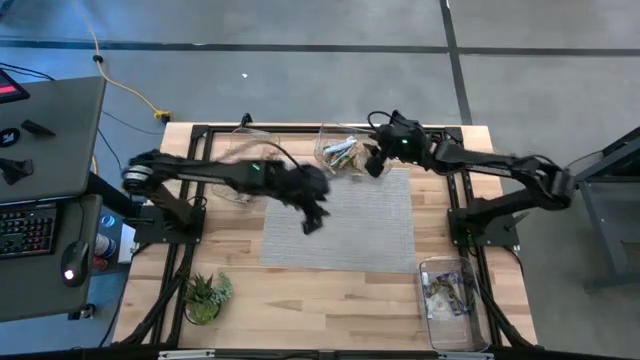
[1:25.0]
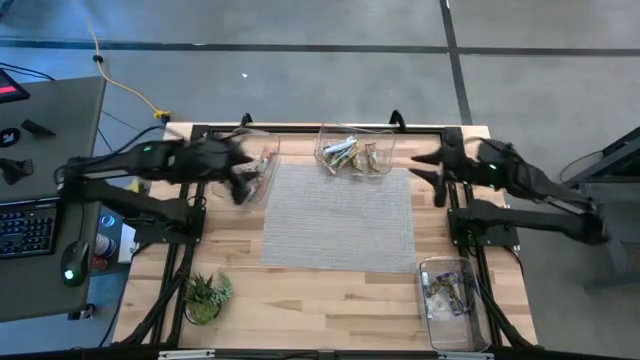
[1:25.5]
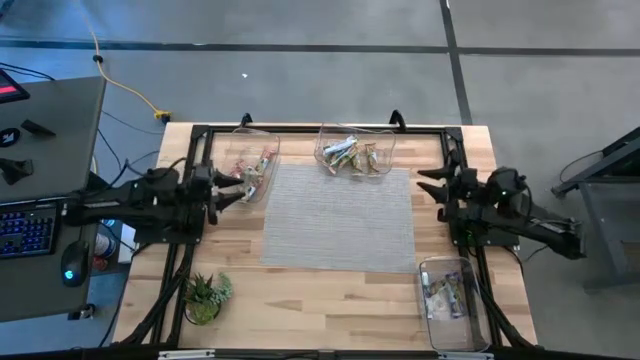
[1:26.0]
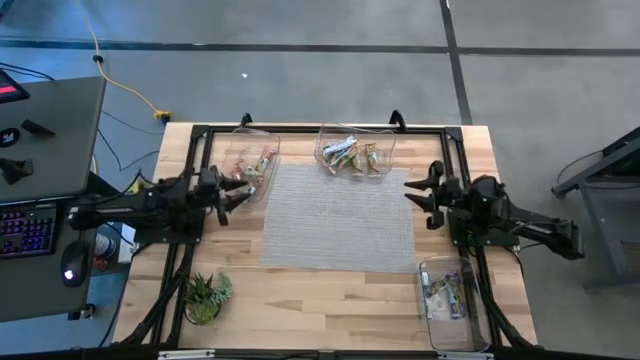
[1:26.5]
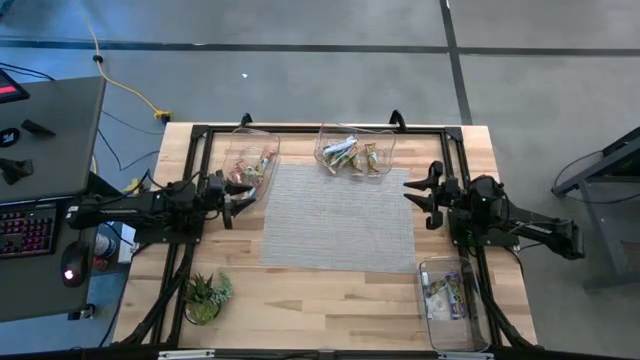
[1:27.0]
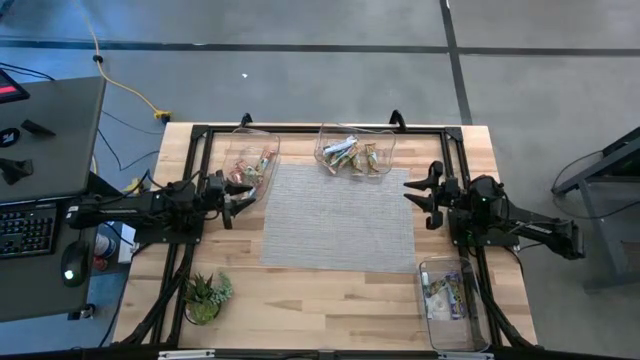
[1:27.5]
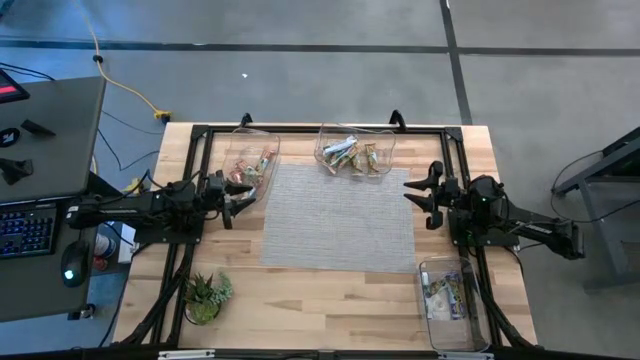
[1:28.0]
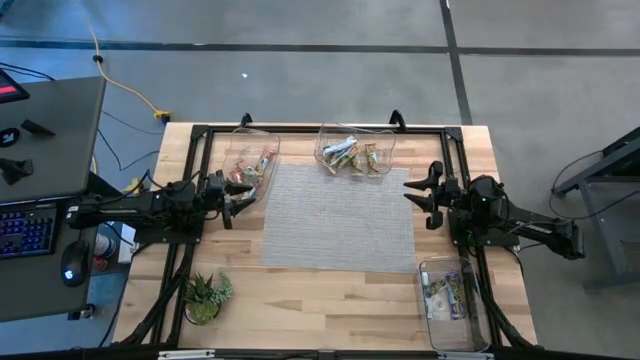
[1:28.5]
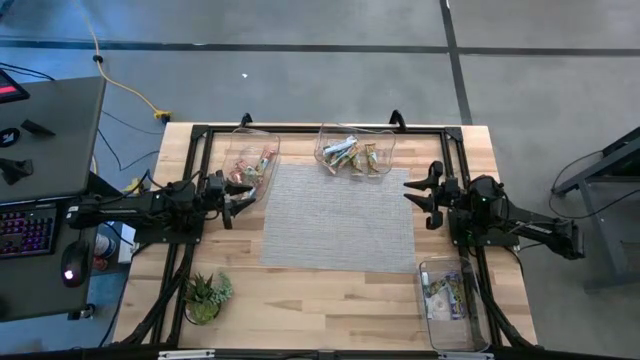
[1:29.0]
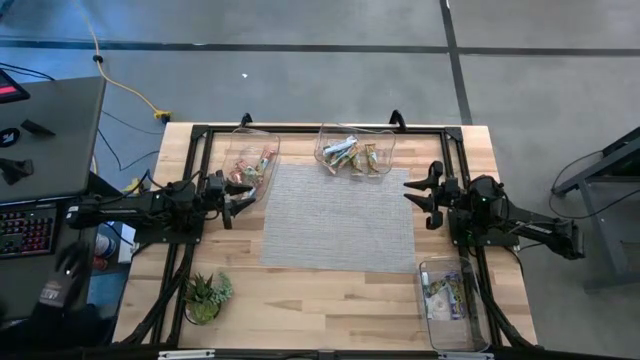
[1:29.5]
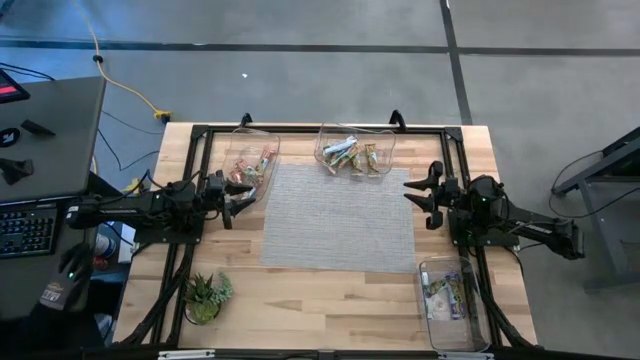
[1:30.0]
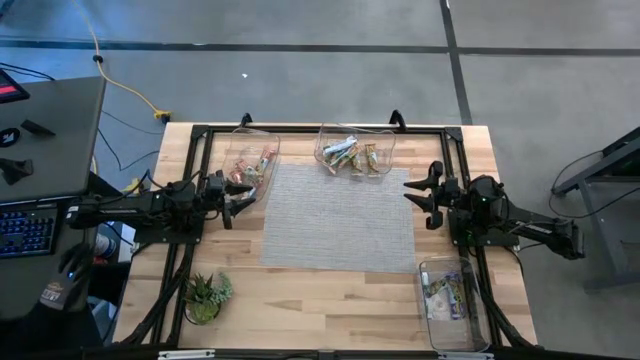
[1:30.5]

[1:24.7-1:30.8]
Task: Pick and place Granola Bars by type
Return to Home Position

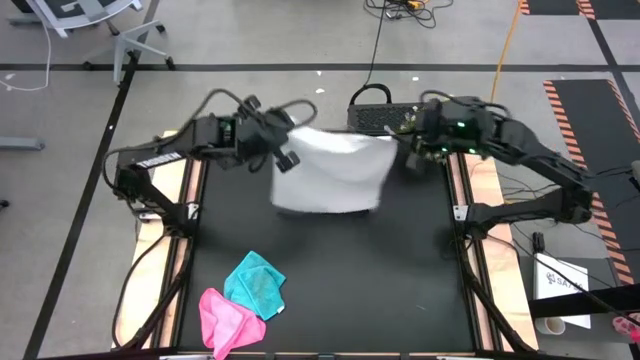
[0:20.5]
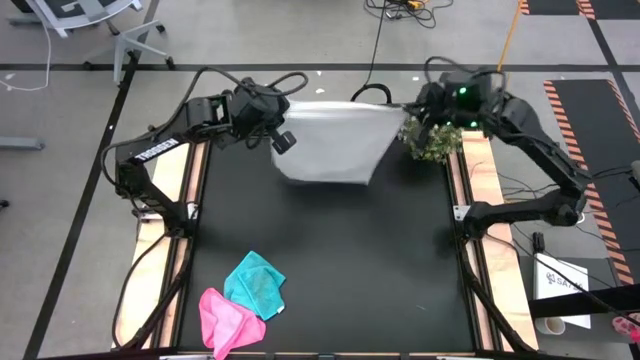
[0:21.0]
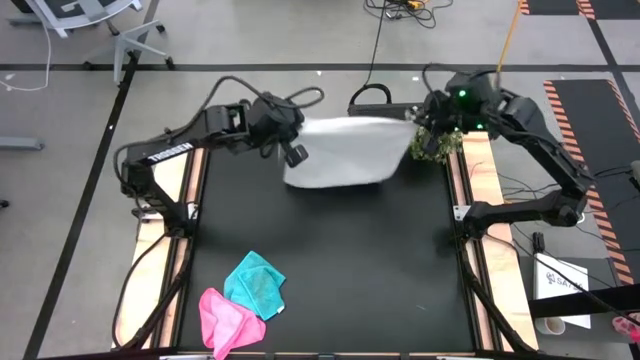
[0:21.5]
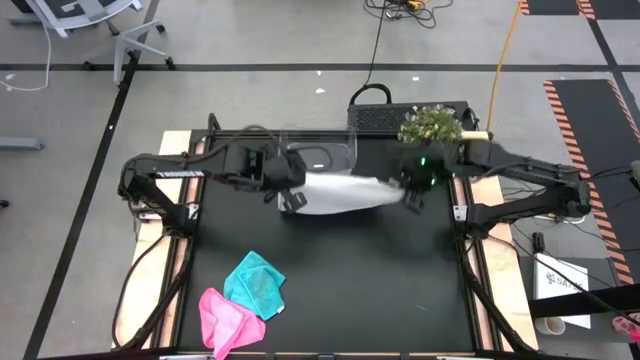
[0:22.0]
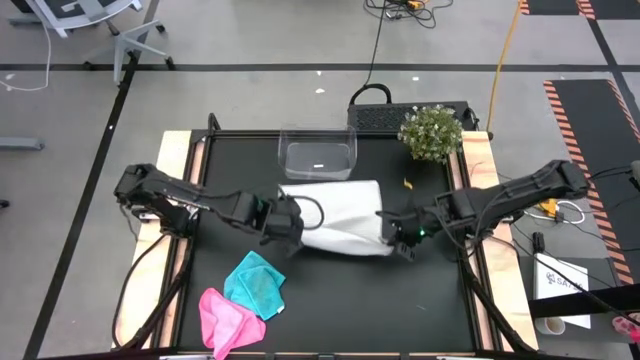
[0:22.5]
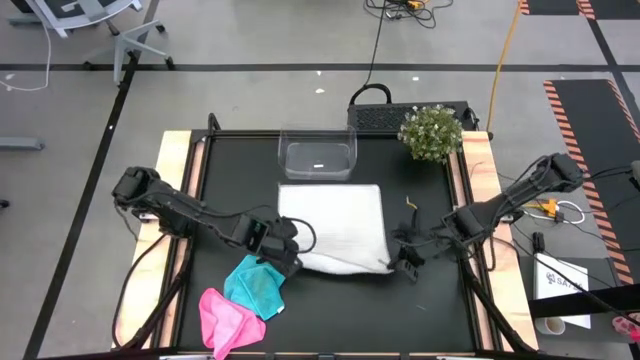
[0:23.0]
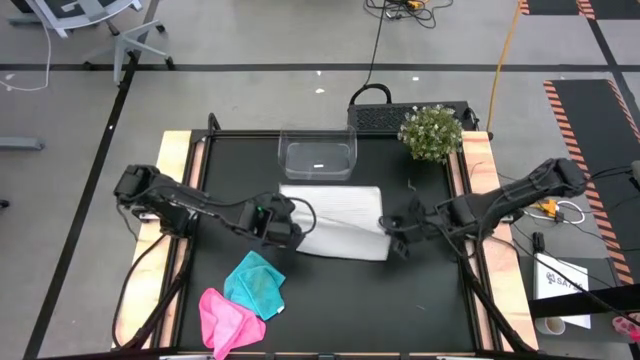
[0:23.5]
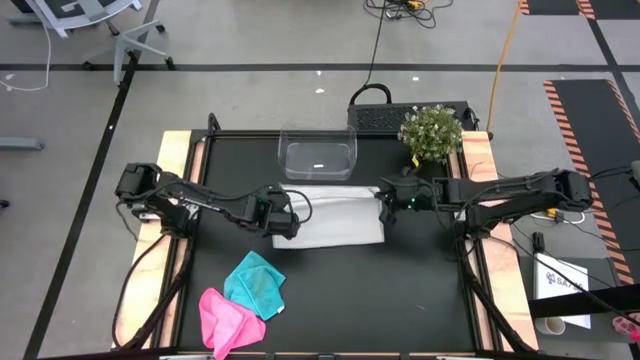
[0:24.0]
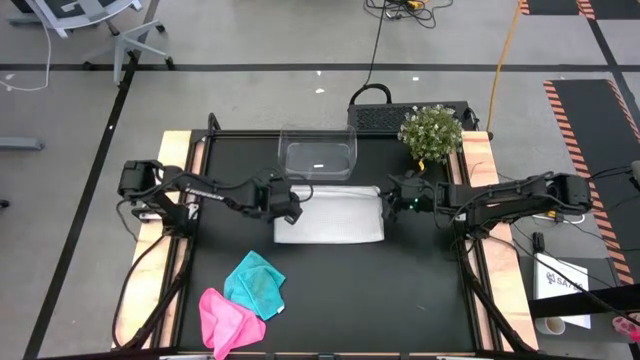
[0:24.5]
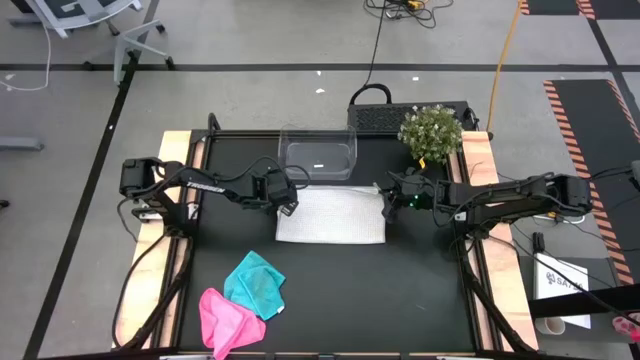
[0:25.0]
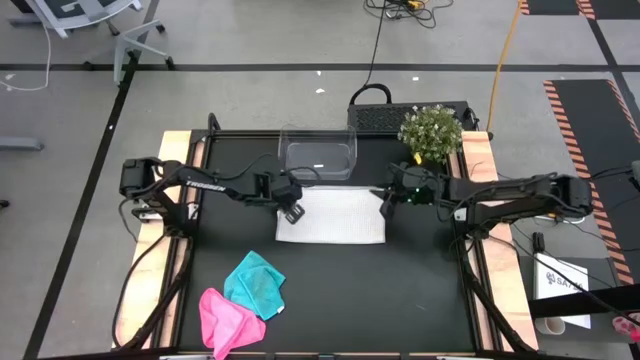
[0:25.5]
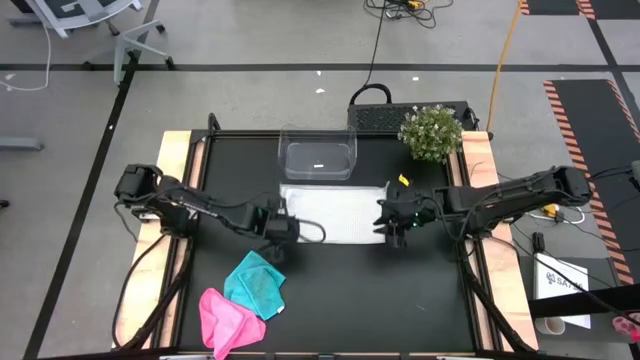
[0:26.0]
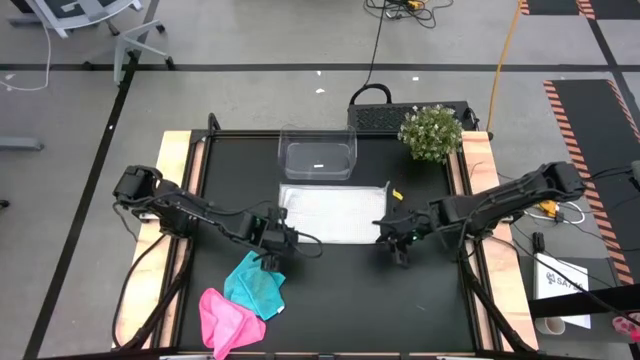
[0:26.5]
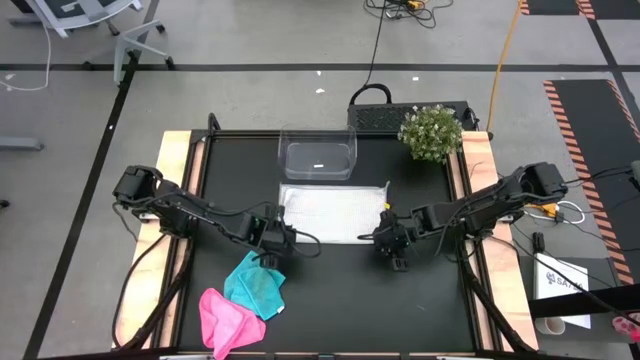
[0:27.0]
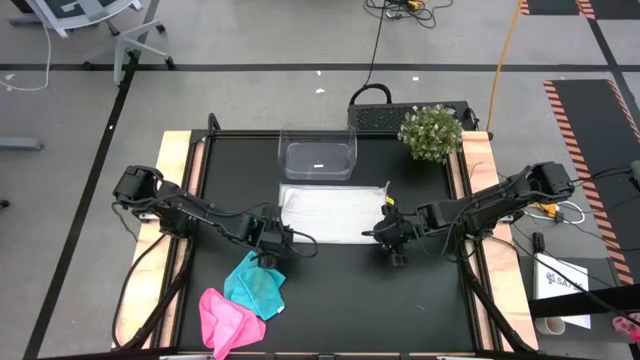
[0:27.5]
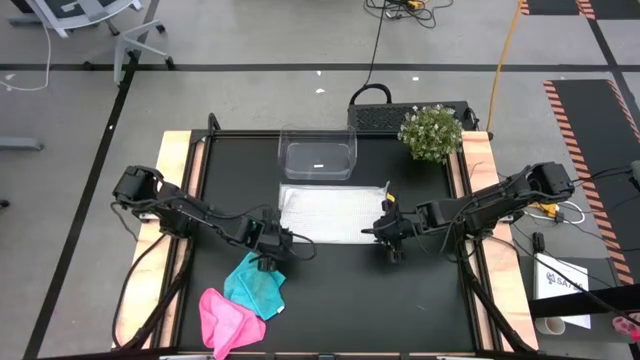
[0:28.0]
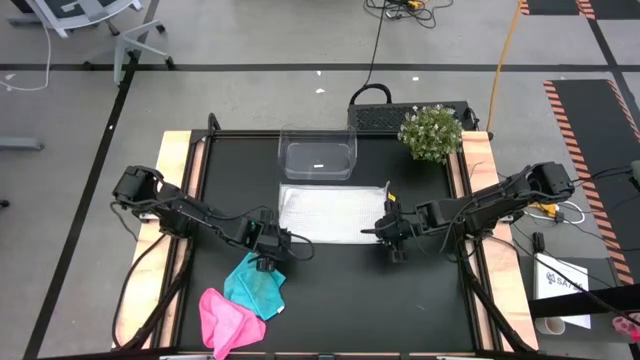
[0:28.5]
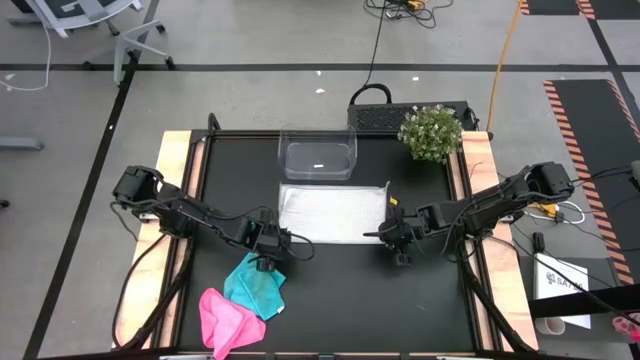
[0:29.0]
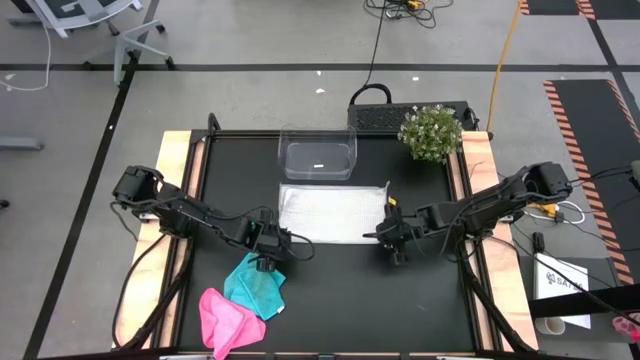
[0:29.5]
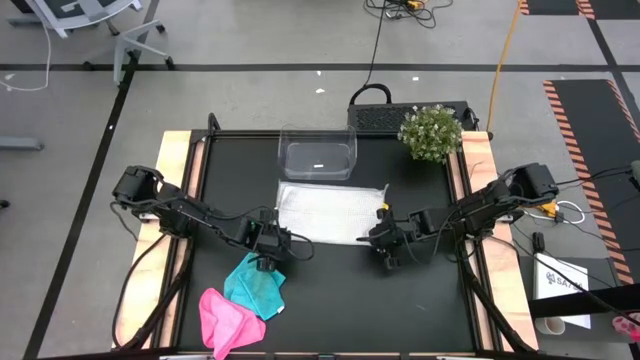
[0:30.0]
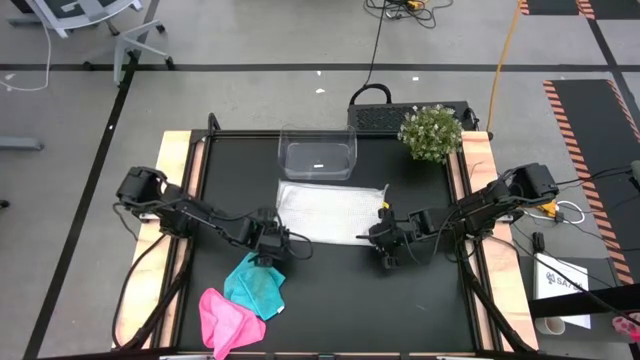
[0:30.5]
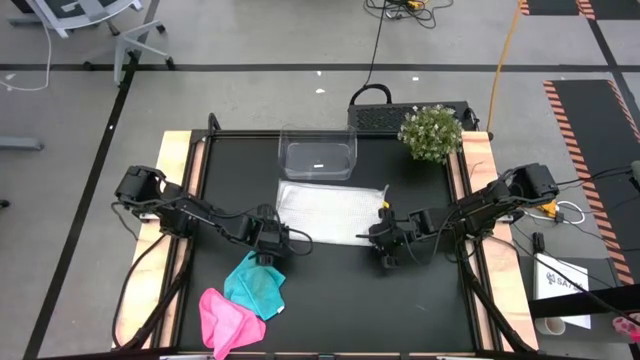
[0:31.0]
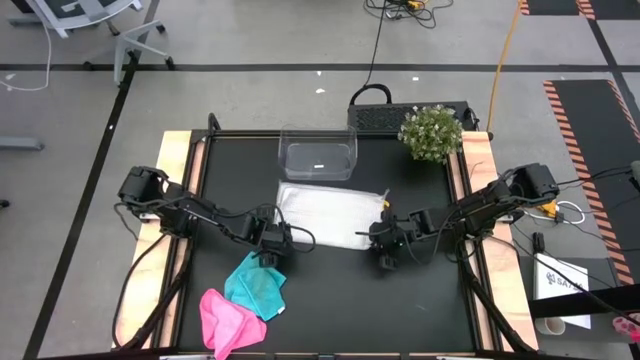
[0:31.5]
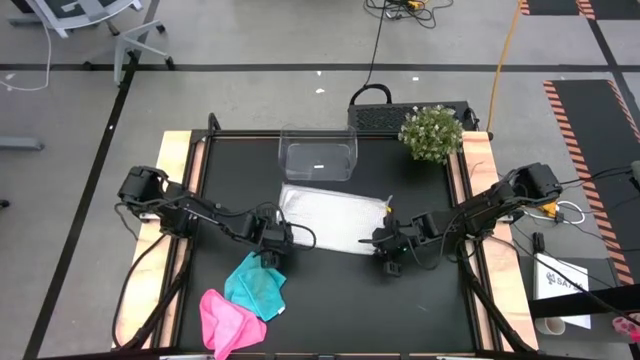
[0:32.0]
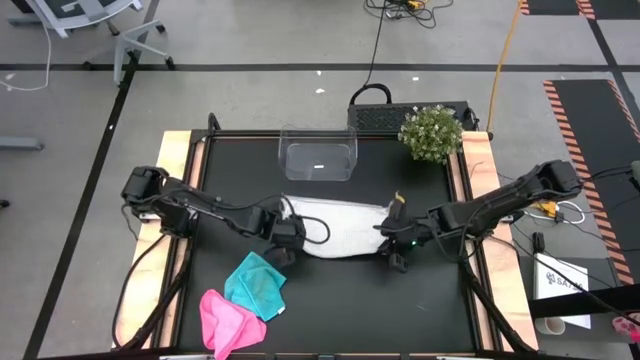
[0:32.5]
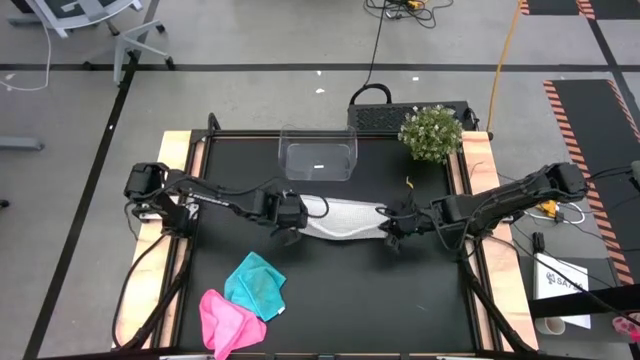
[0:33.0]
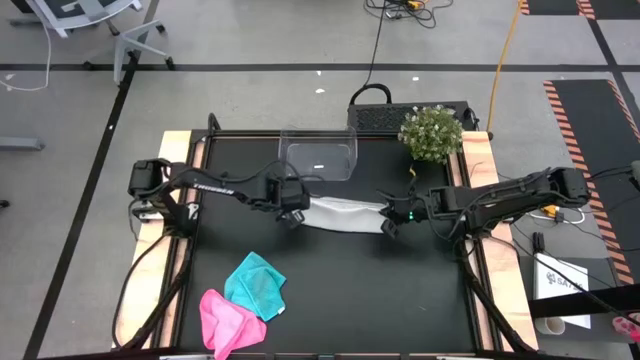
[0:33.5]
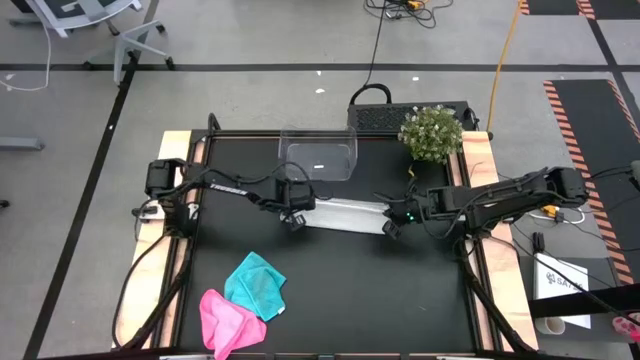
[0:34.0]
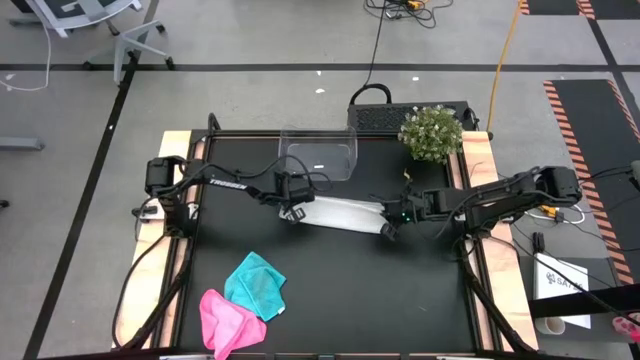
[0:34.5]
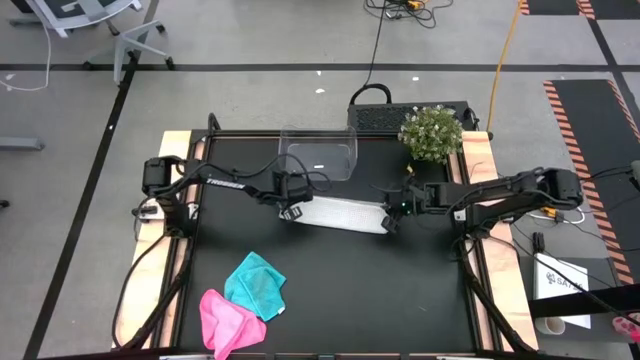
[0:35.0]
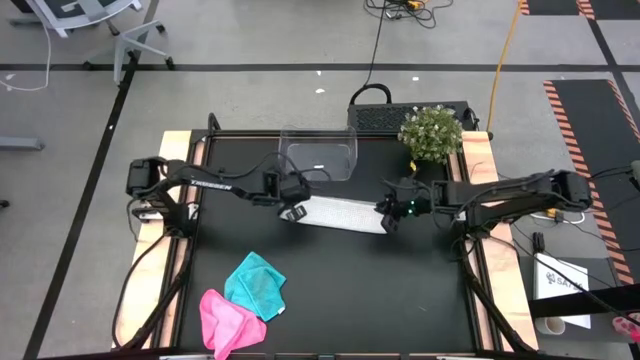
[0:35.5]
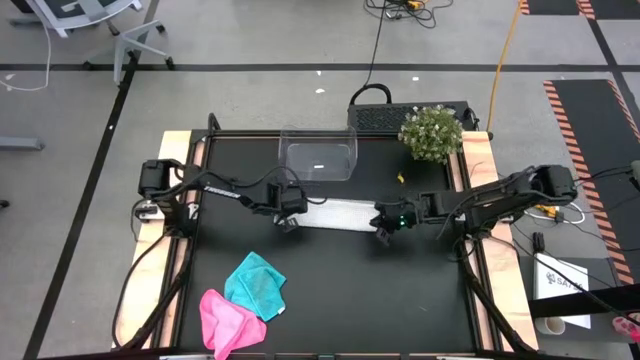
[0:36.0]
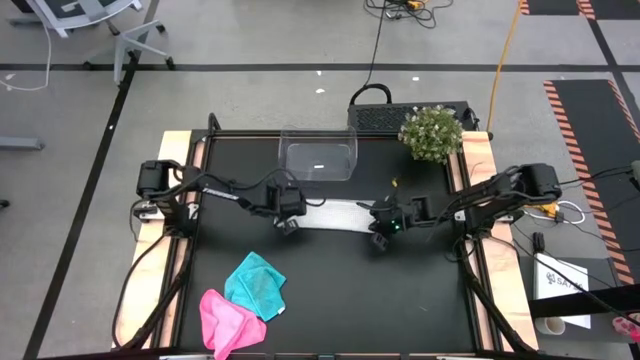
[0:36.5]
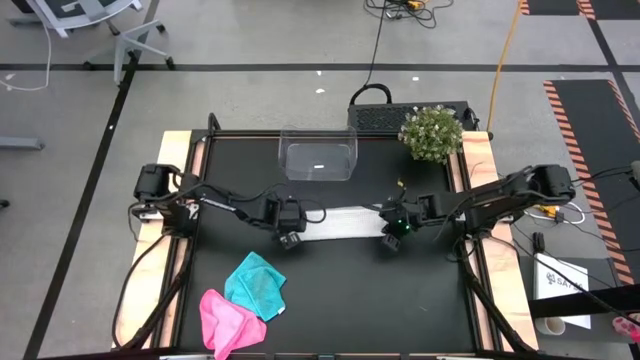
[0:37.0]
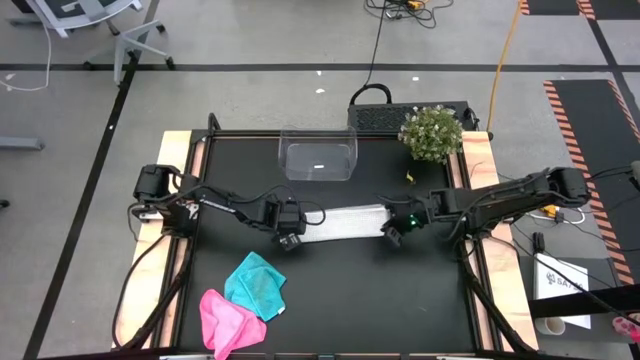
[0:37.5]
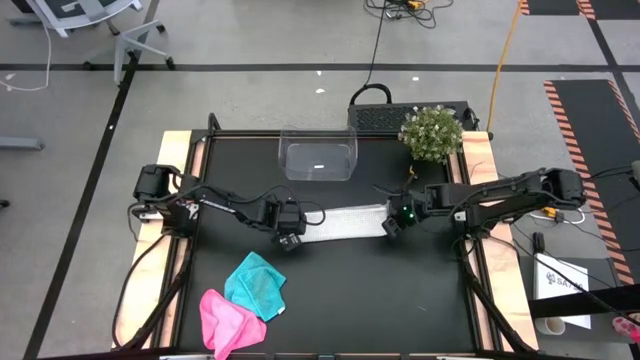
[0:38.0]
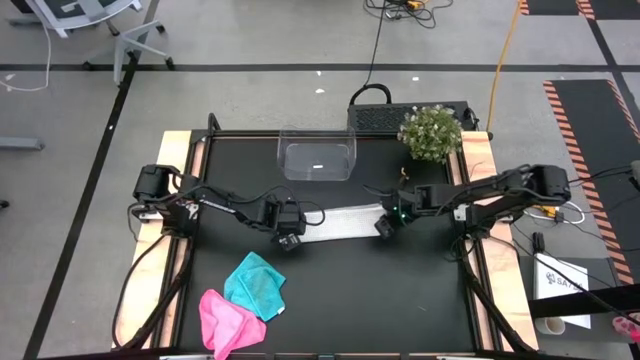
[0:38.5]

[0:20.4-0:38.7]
Task: Fold microfiber towels
Fold the white microfiber towel
